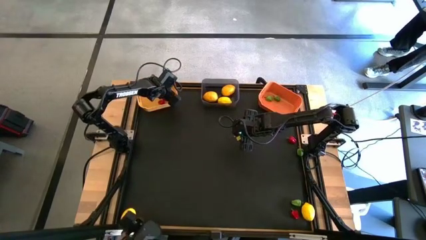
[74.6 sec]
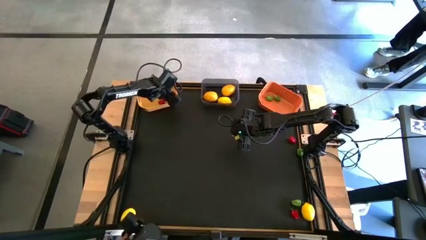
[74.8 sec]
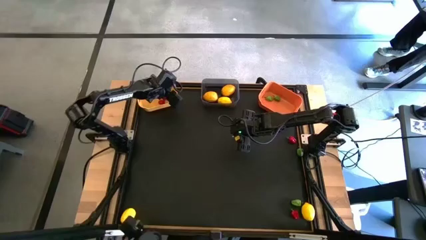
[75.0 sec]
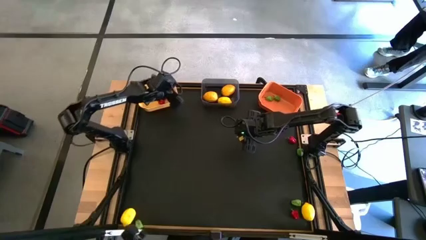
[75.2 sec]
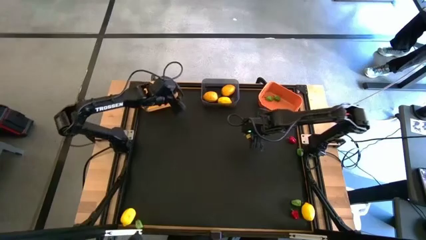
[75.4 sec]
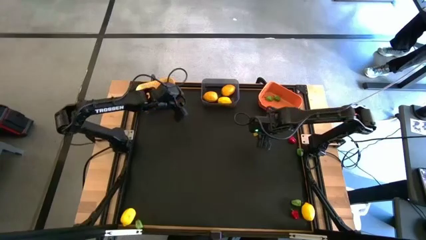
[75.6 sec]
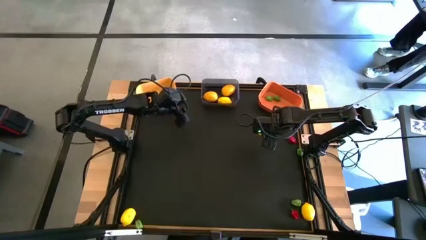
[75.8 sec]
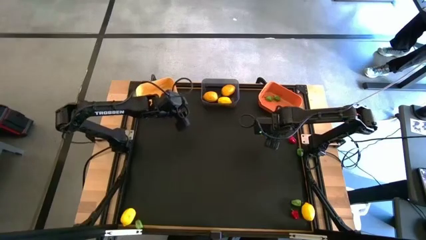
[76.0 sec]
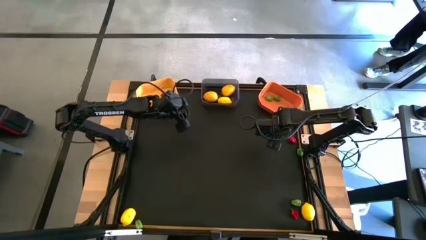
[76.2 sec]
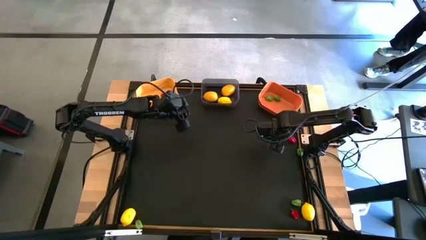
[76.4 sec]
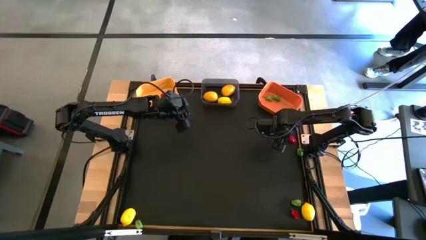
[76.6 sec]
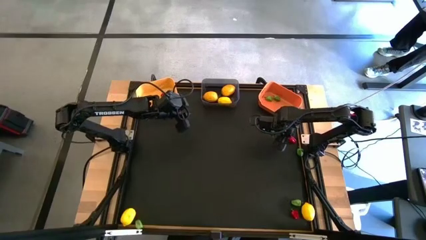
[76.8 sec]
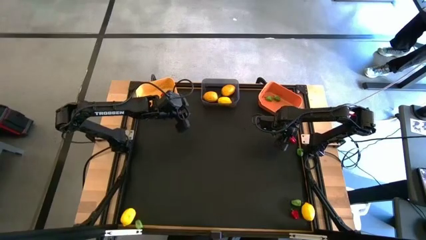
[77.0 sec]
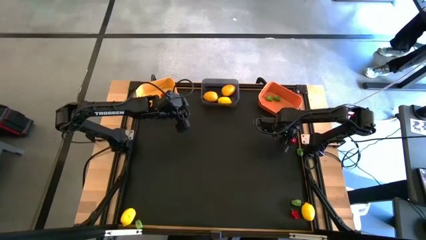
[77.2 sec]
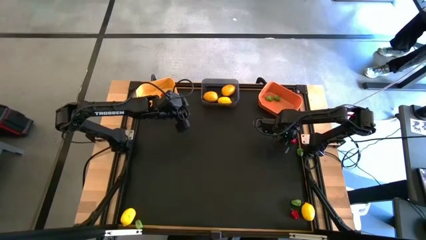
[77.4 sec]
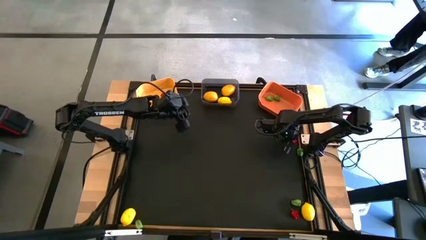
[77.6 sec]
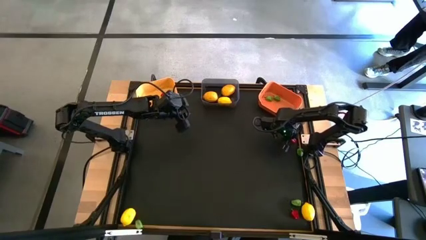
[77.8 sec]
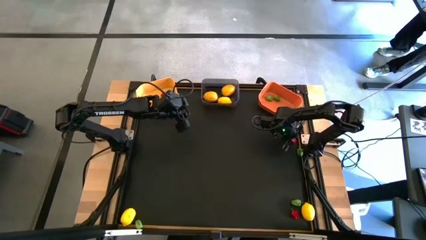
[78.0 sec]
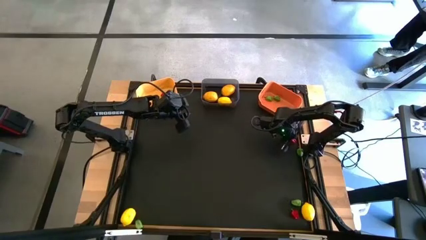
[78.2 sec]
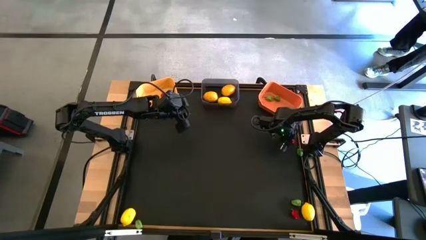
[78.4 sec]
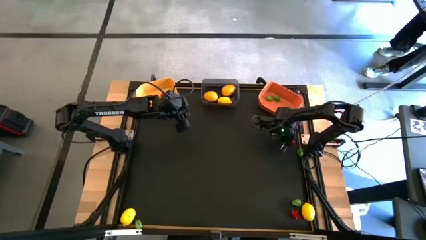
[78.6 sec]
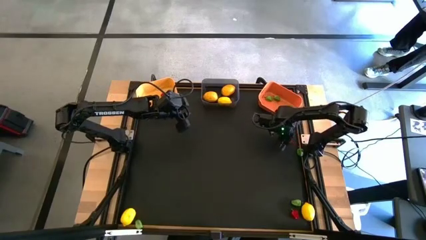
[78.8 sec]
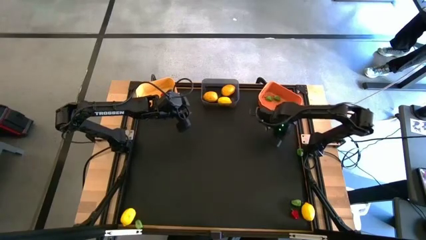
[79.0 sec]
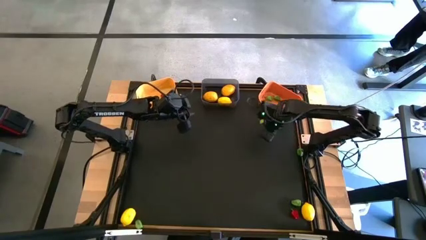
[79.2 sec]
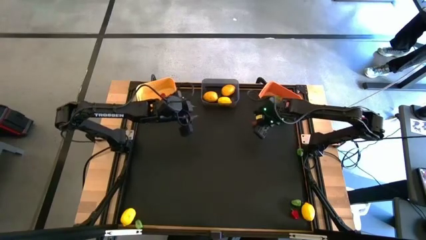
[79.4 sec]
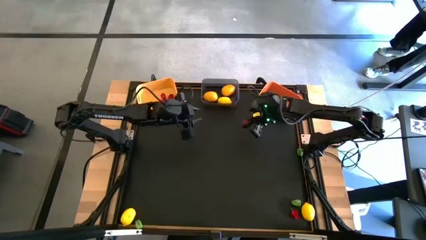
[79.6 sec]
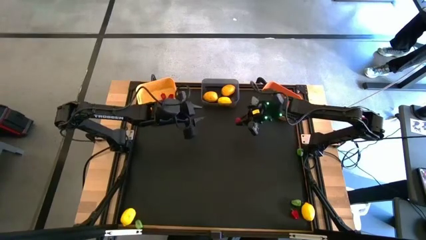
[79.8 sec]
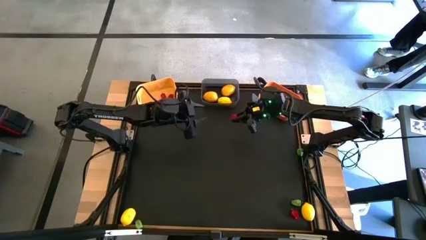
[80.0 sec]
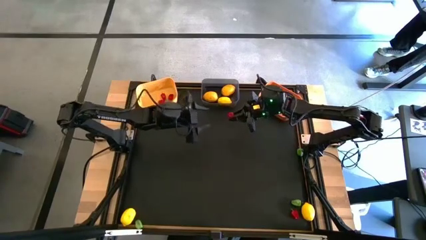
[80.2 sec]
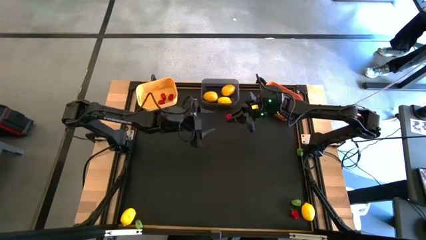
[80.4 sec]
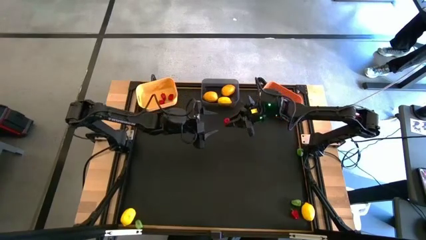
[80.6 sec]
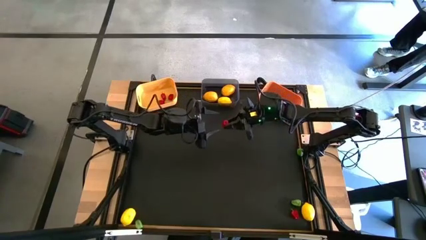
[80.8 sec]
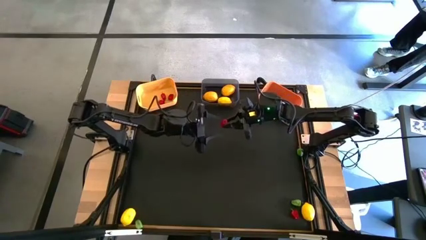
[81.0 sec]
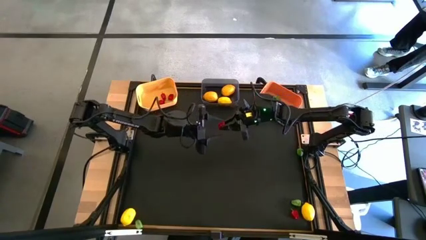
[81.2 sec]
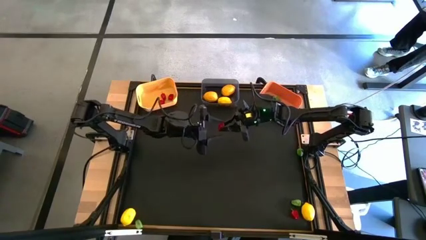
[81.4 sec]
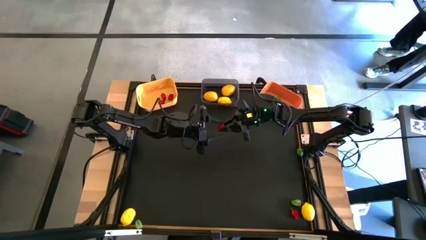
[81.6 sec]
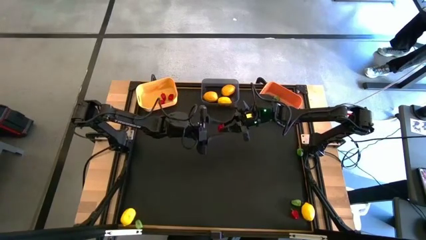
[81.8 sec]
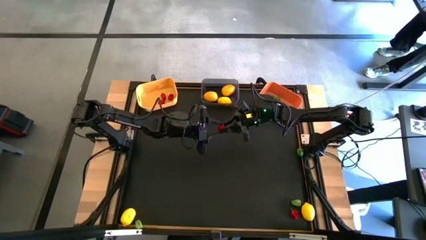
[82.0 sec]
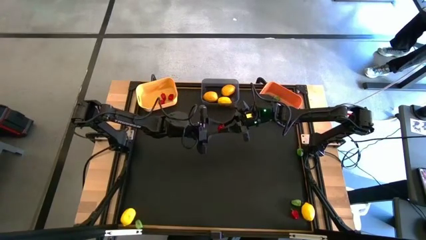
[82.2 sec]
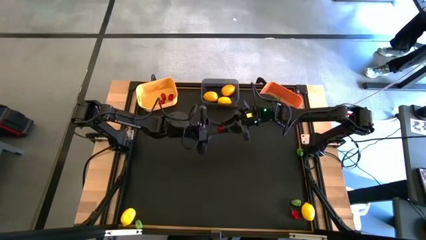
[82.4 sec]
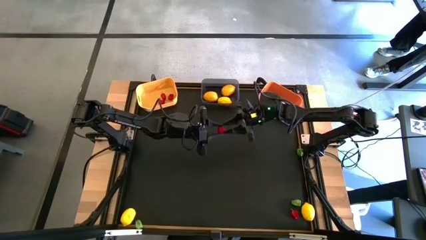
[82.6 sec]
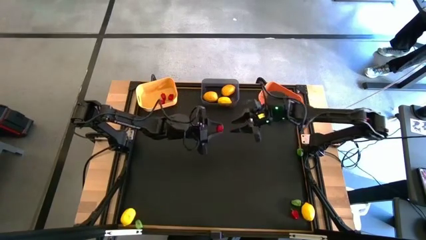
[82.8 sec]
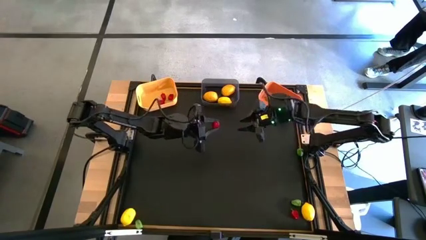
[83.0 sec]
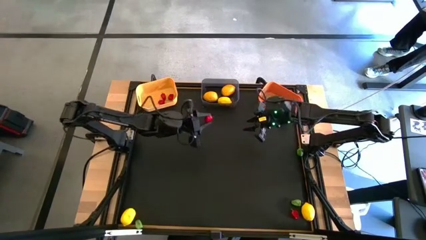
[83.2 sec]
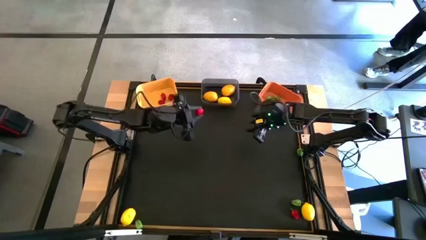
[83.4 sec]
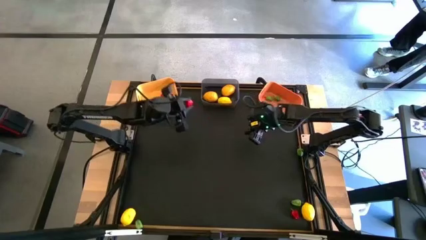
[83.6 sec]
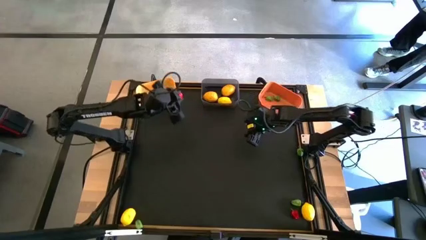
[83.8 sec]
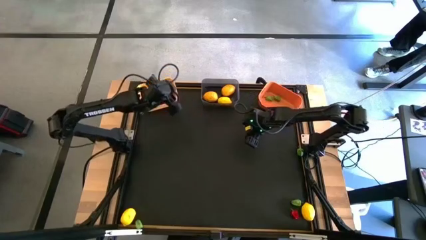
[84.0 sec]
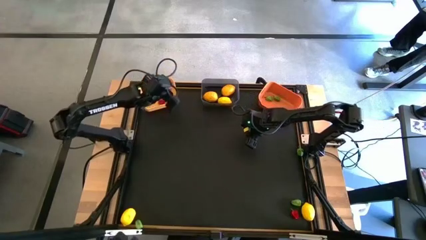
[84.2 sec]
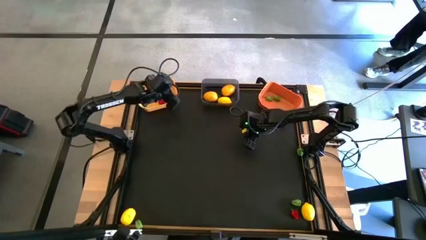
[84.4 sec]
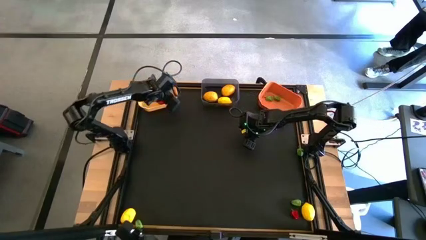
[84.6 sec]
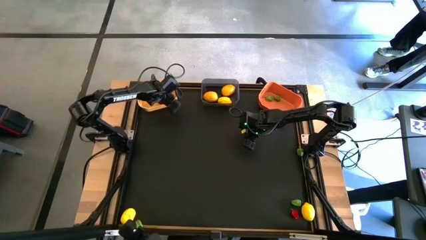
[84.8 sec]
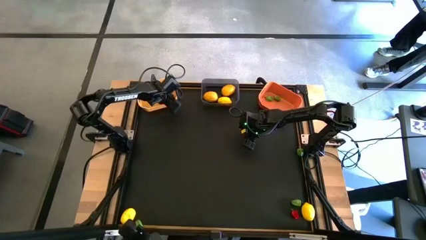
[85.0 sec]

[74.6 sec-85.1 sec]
Task: Sort produce into baskets
Put the red chili pepper into the yellow bin

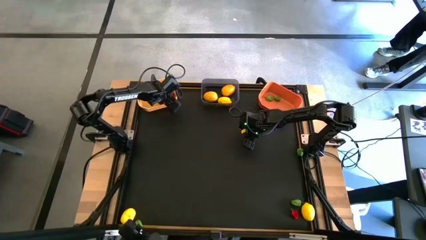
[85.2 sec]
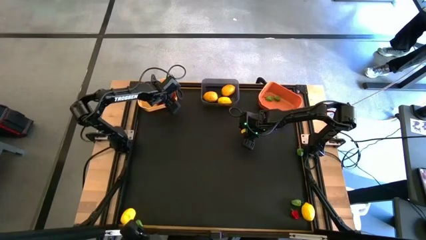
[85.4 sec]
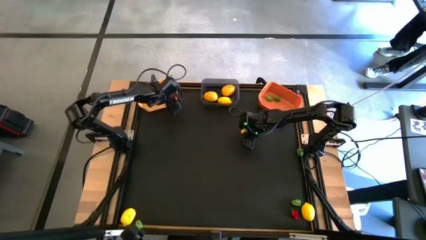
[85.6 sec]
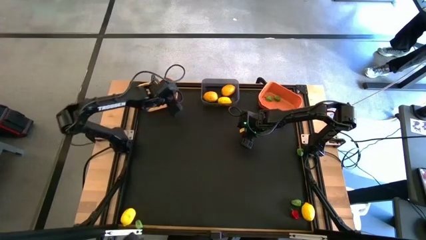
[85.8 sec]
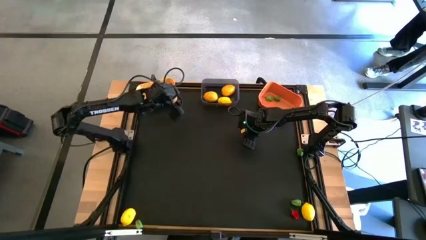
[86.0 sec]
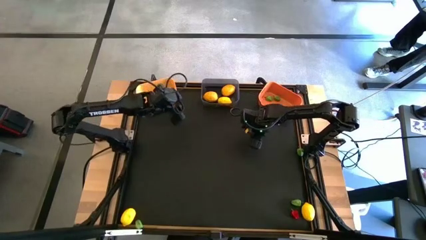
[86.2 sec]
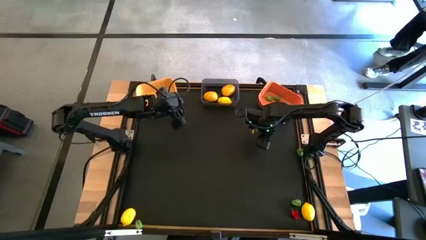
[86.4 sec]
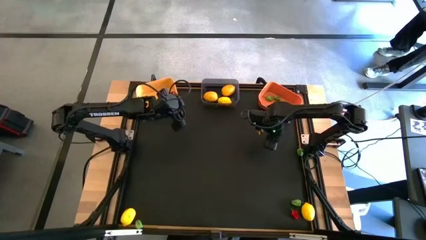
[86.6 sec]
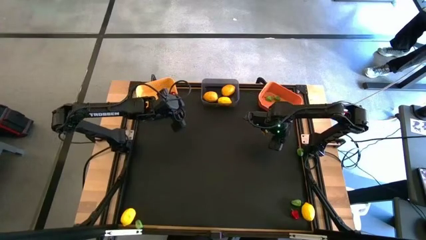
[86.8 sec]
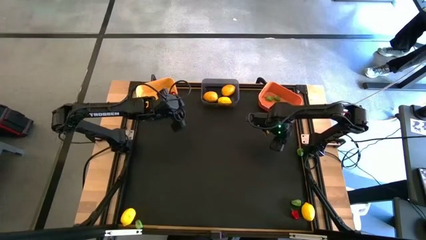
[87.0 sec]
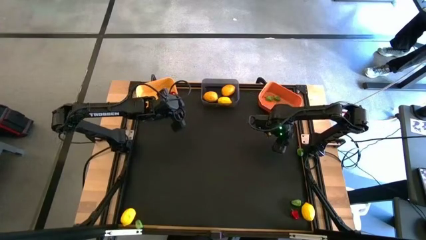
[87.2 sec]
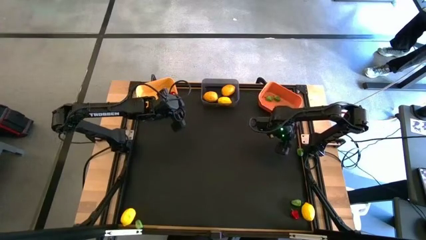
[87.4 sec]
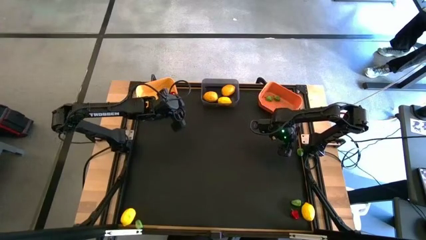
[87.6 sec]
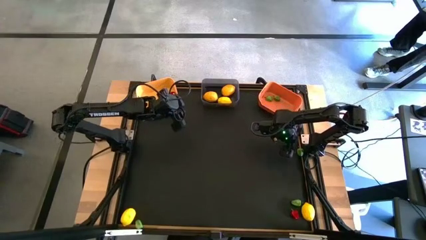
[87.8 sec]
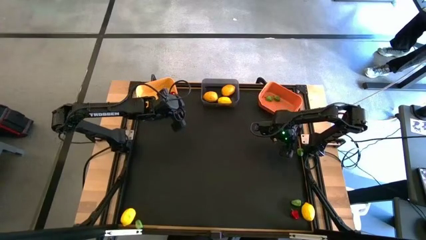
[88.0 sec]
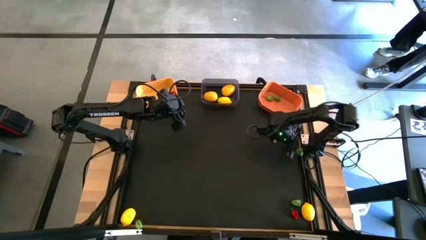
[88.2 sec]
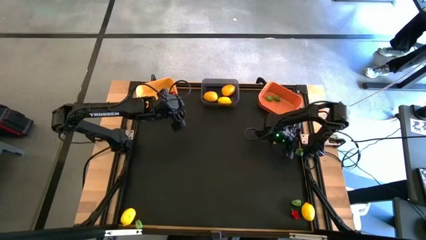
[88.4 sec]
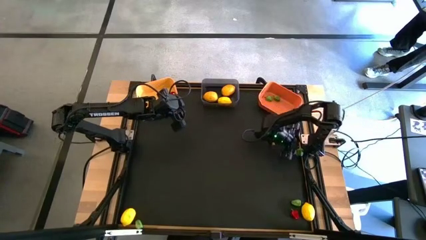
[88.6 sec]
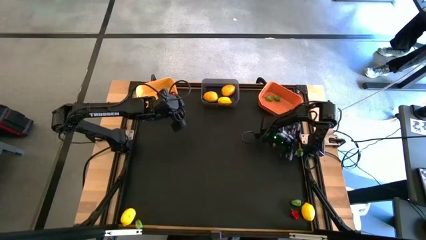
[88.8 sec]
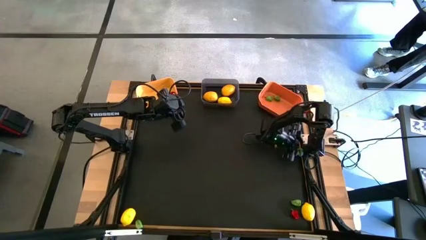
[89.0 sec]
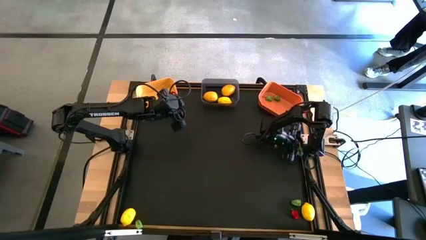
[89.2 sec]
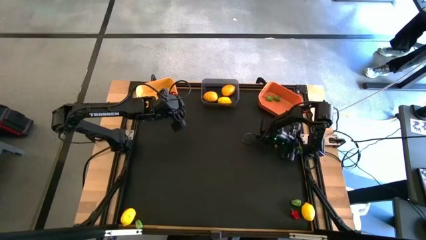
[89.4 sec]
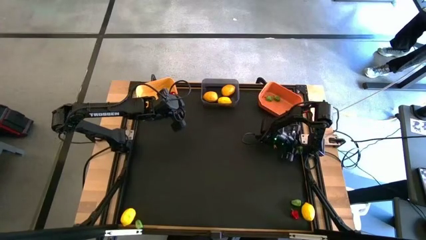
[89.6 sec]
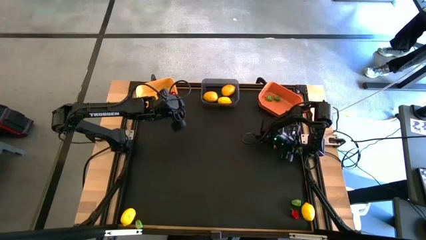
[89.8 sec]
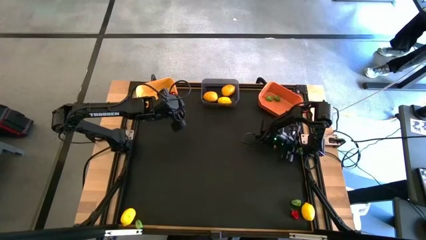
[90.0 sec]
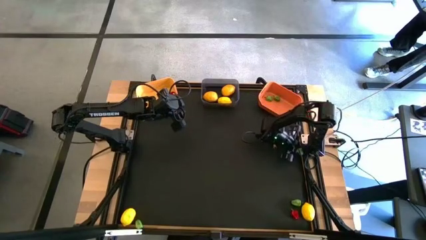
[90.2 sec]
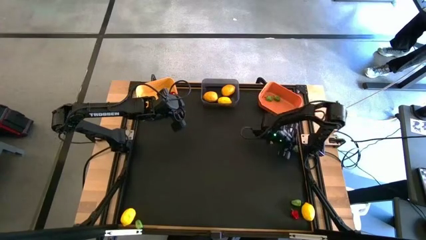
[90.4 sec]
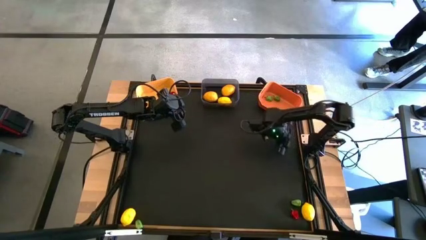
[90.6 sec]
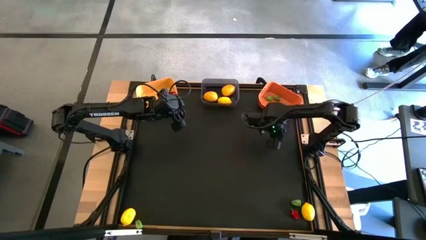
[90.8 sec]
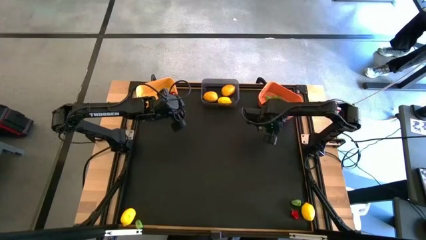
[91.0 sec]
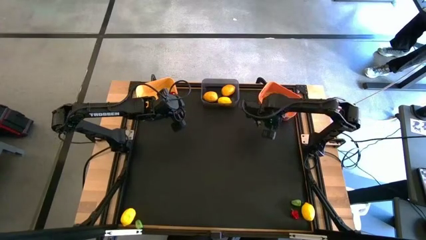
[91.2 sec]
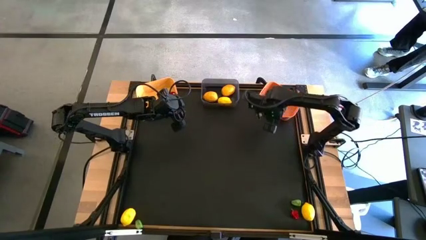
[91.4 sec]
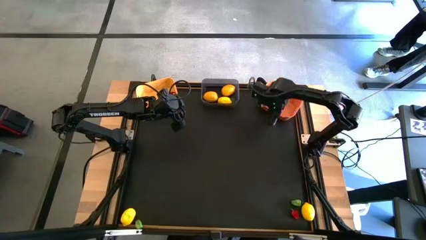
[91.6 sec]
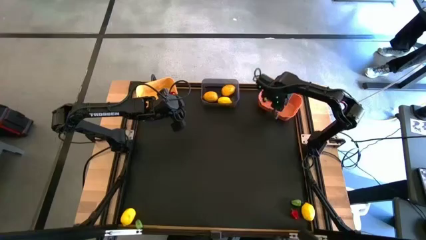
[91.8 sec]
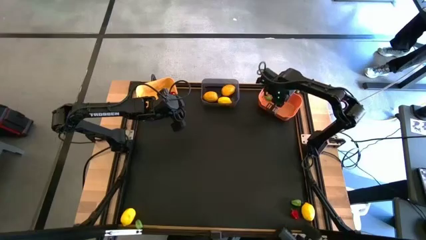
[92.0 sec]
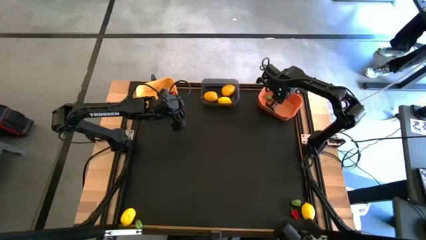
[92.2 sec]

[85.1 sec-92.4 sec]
Put the green chili pepper into the orange bin
